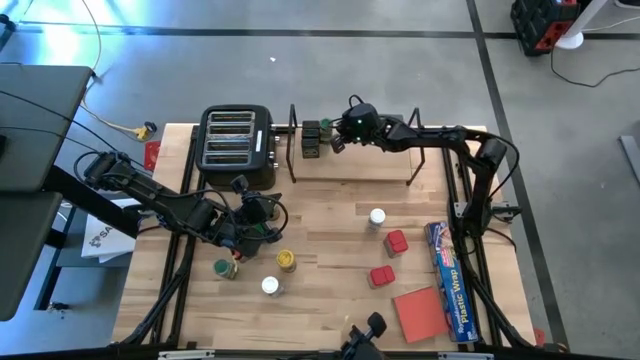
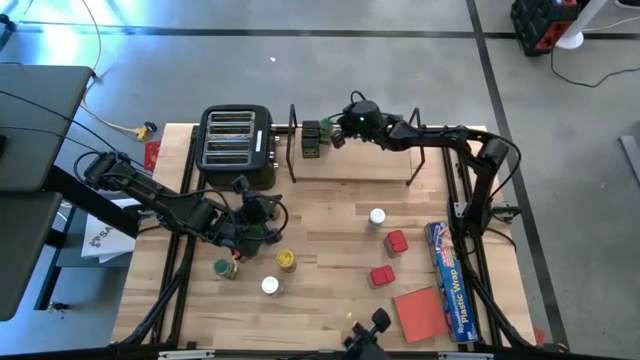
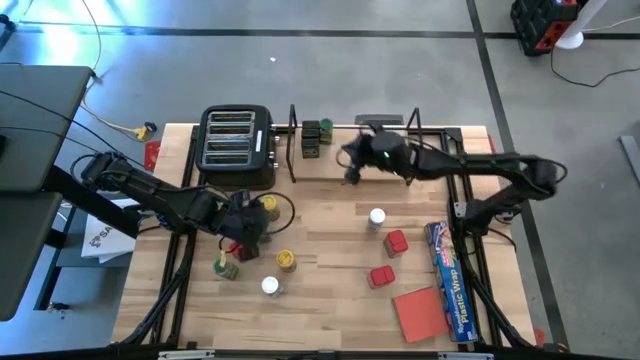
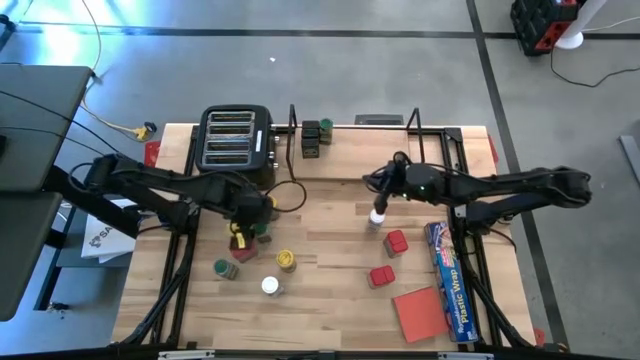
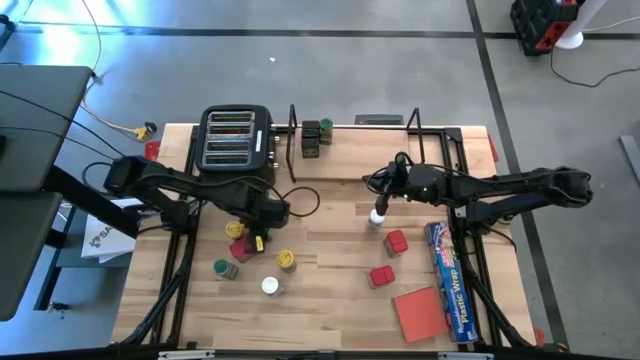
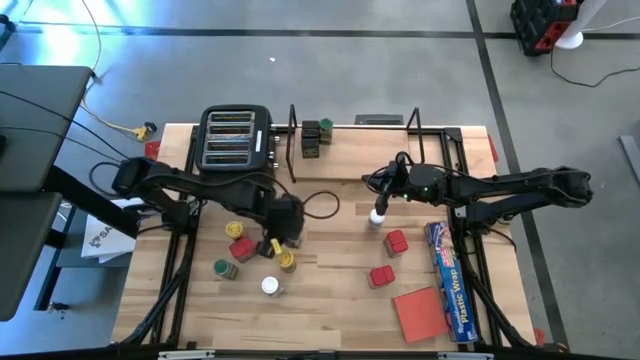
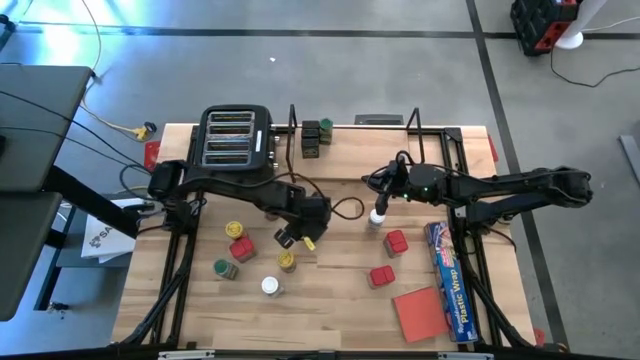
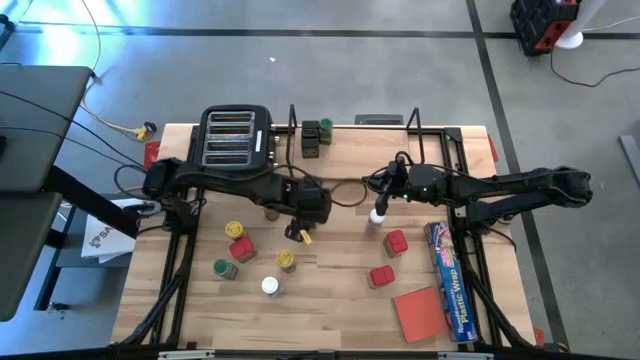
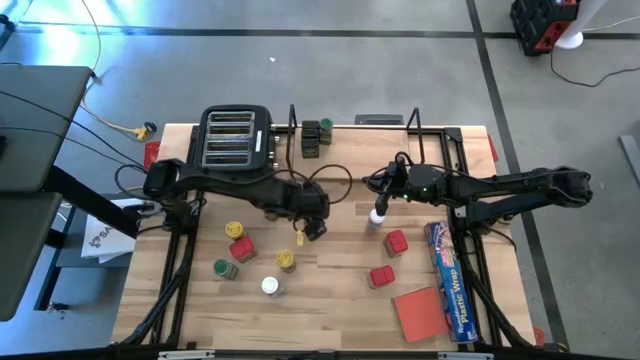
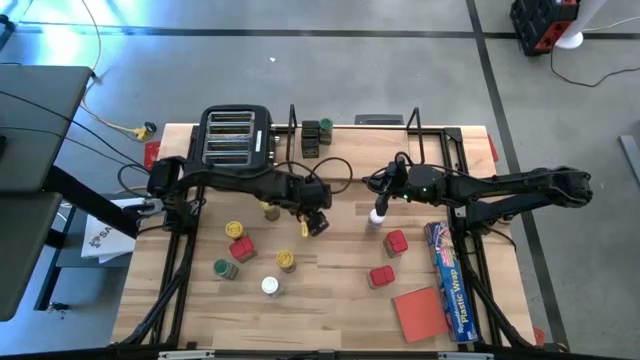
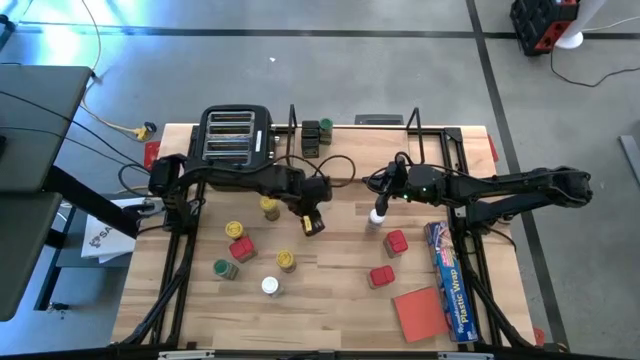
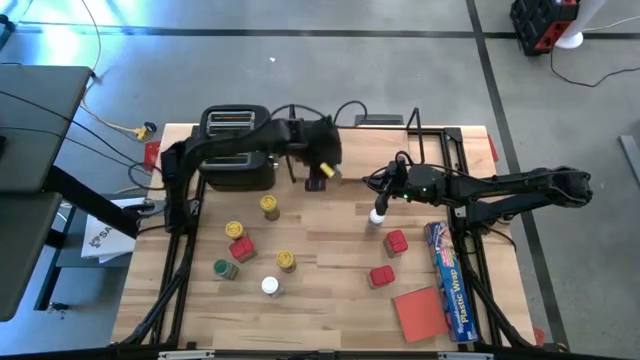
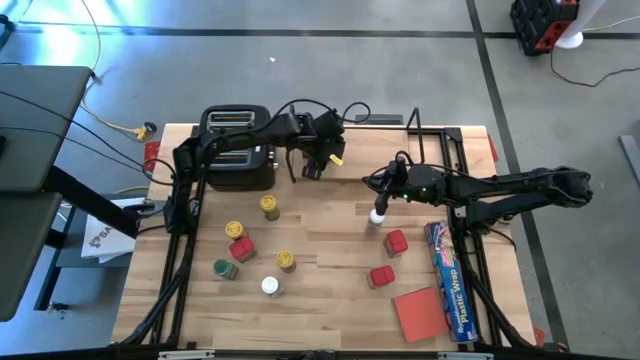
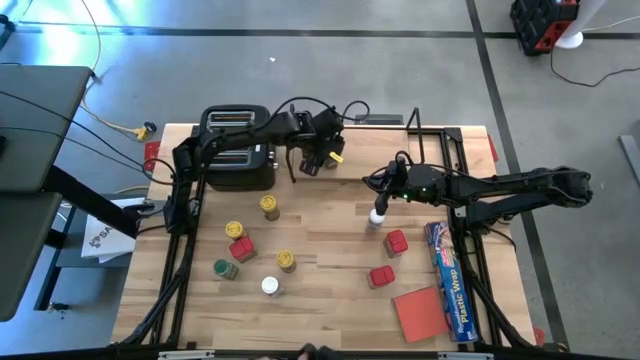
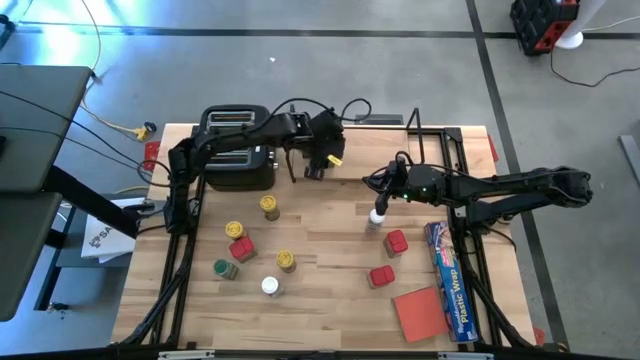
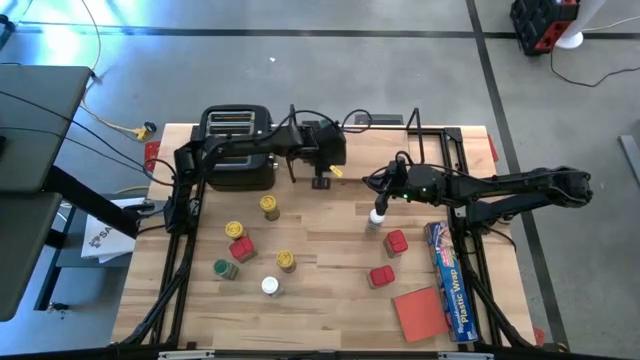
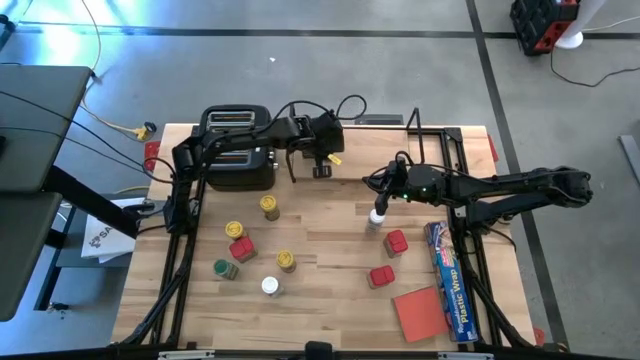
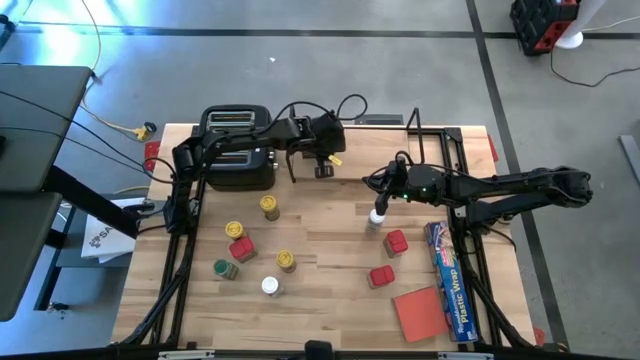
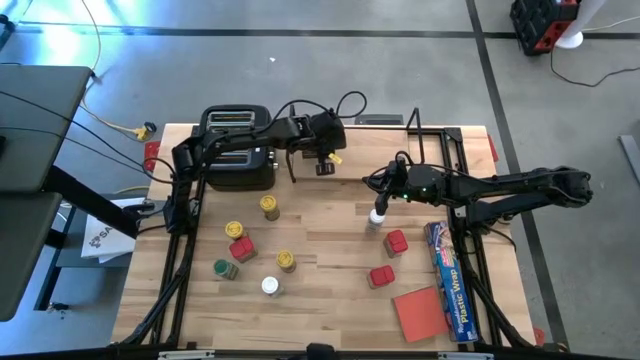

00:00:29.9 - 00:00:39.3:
Task: Shelf spices
Put the top green seasoning bottle on the shelf aligned with the other green seasoning bottle

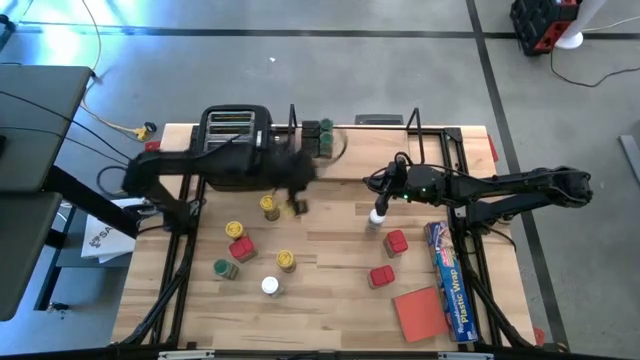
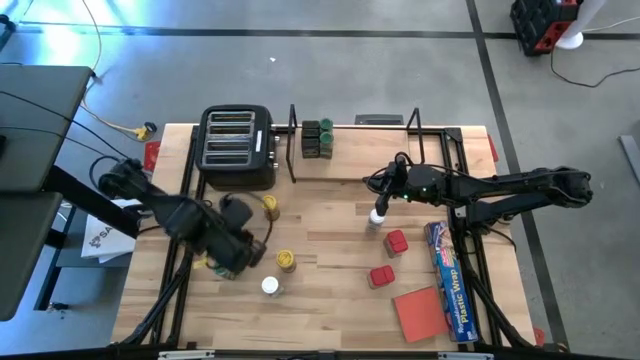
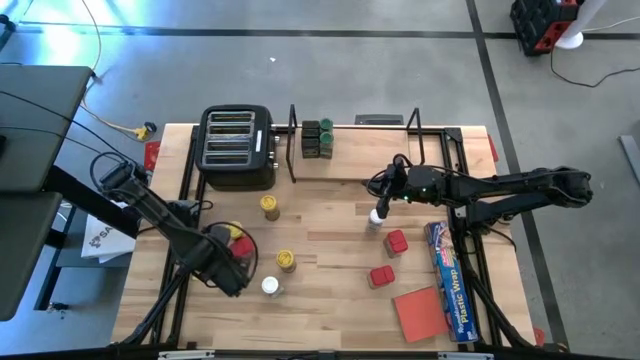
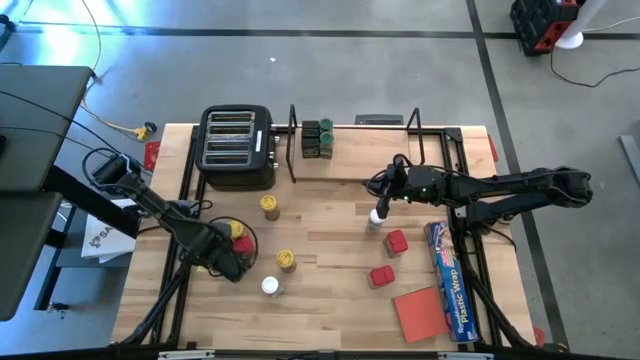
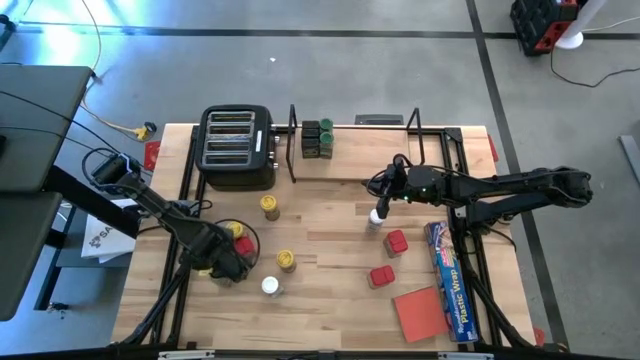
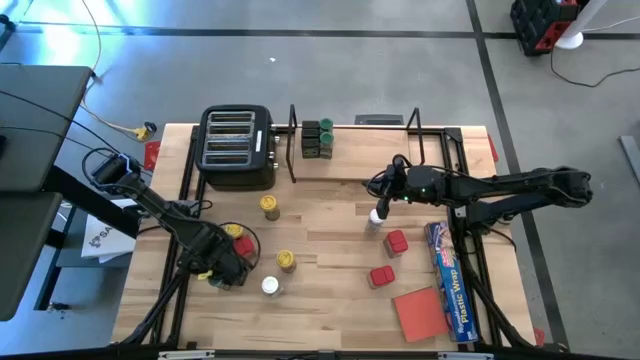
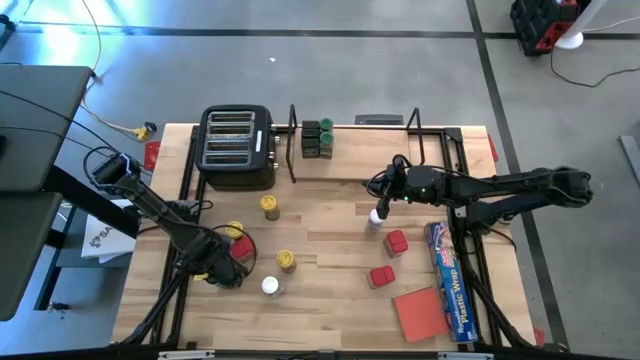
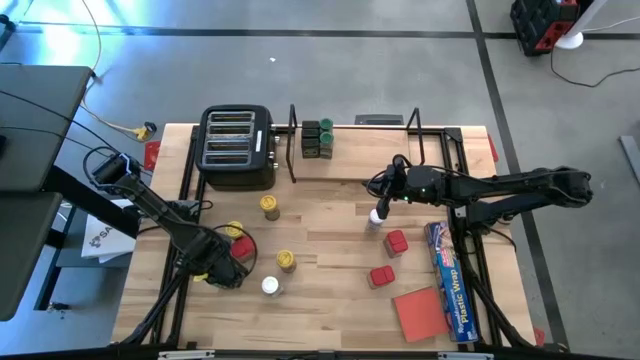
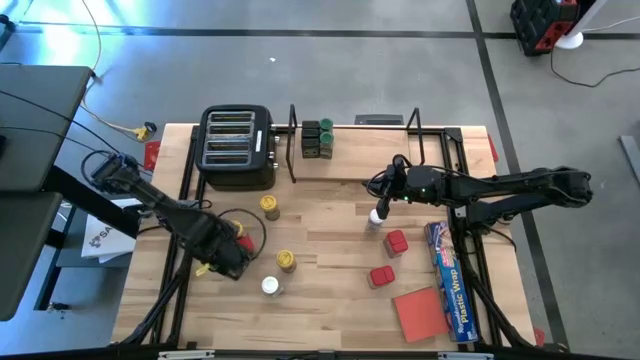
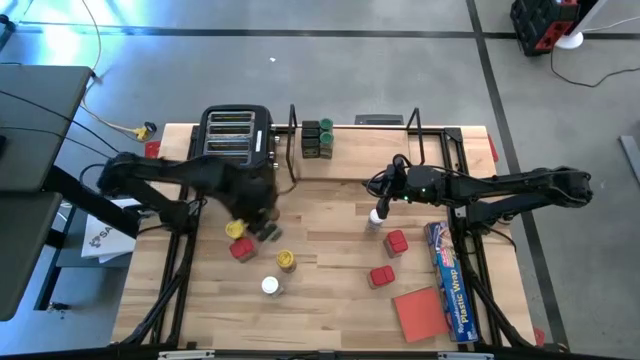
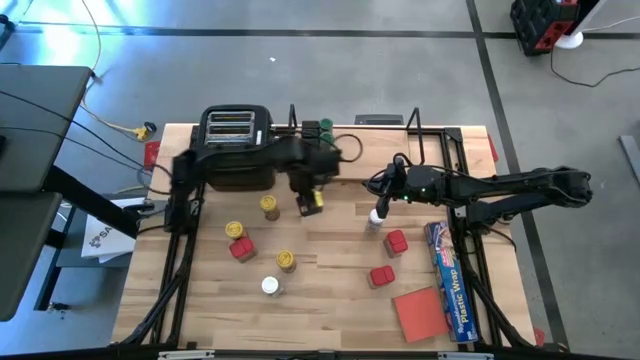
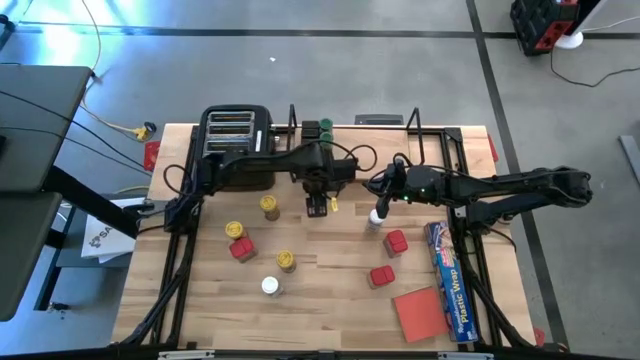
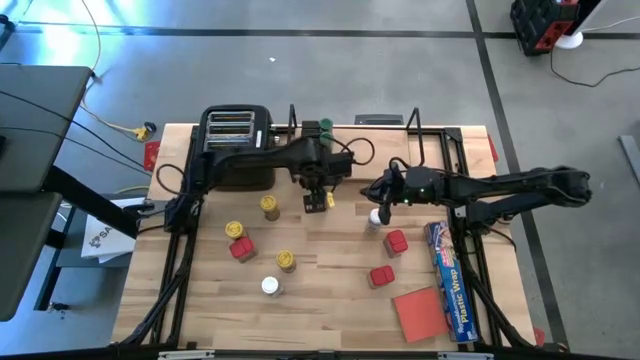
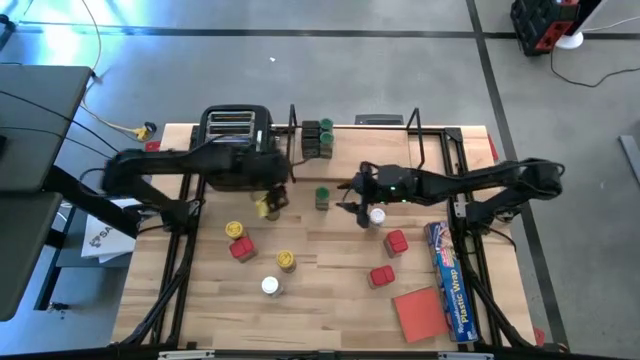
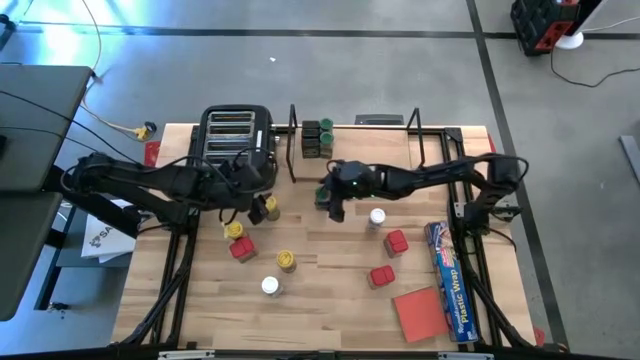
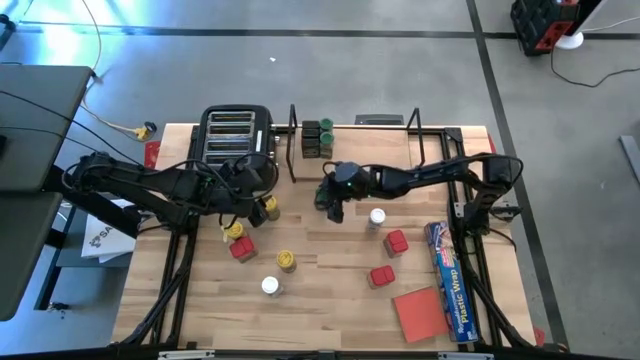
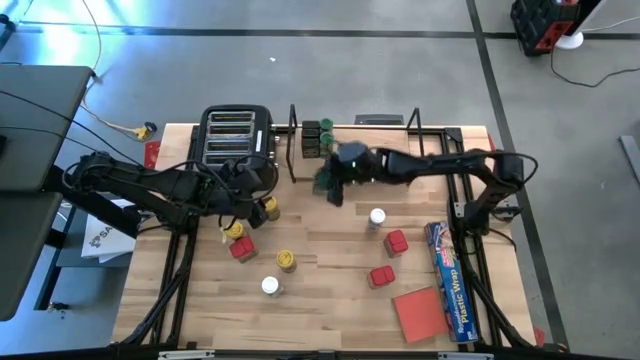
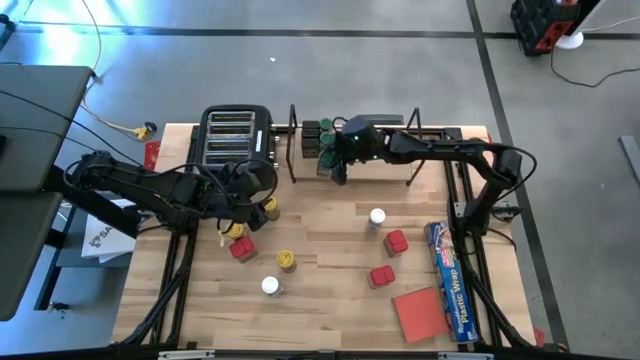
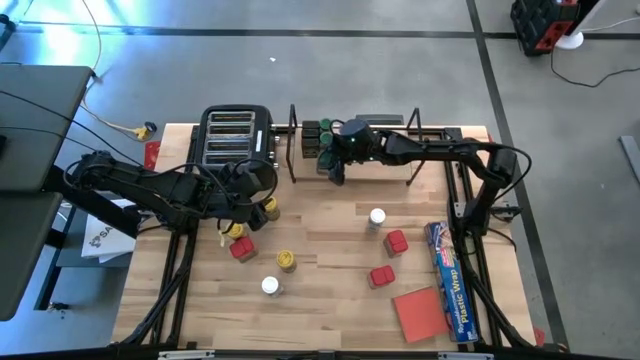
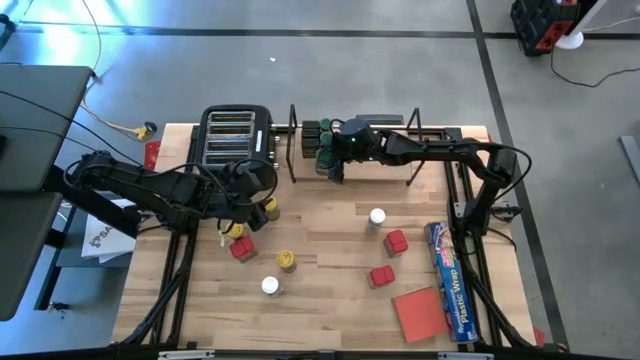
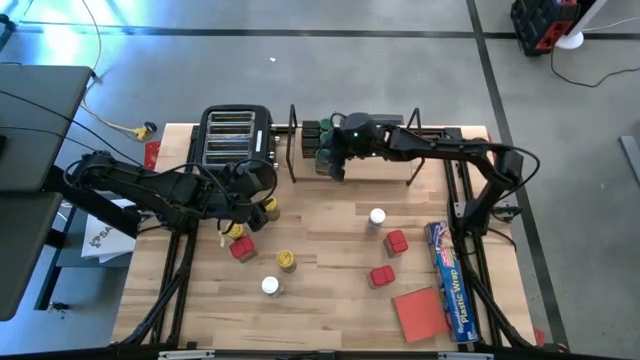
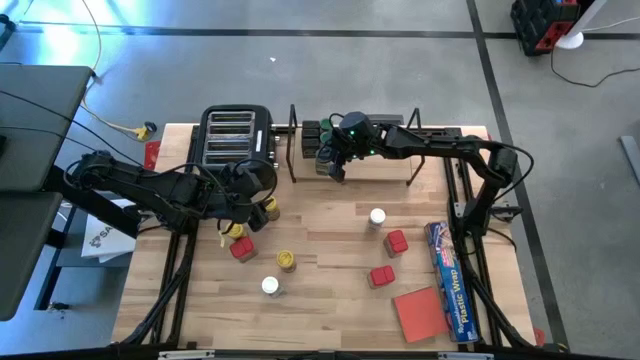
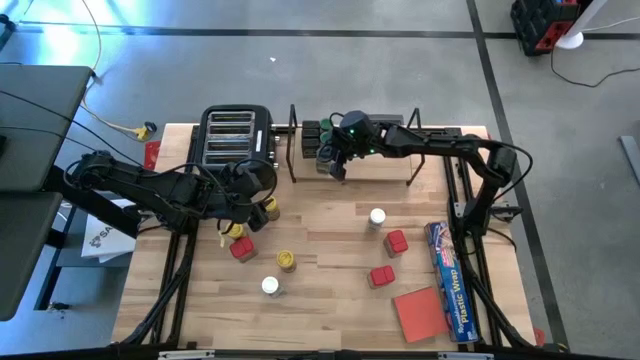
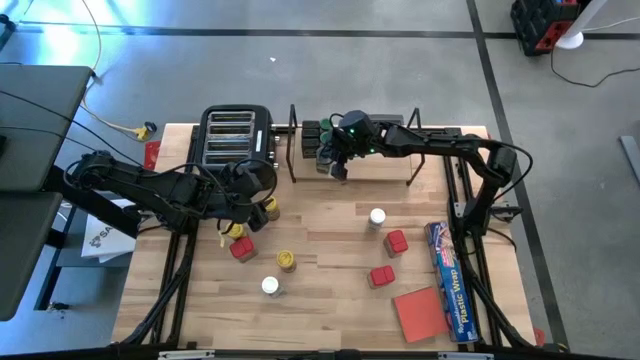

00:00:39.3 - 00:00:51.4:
Put the green seasoning bottle on the shelf aligned with the other green seasoning bottles
